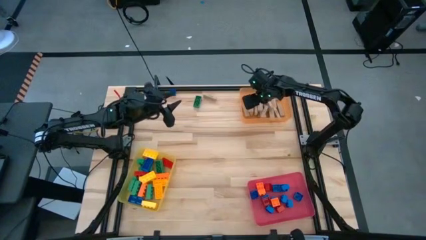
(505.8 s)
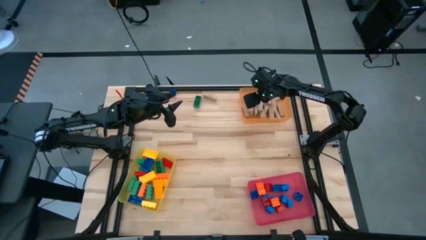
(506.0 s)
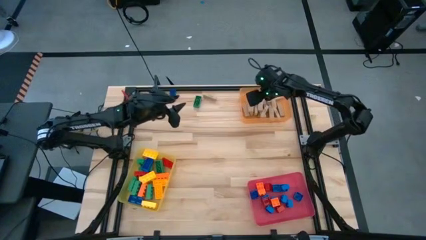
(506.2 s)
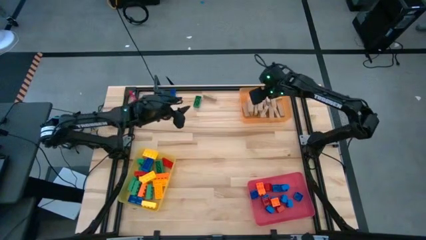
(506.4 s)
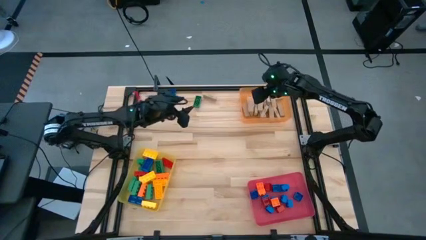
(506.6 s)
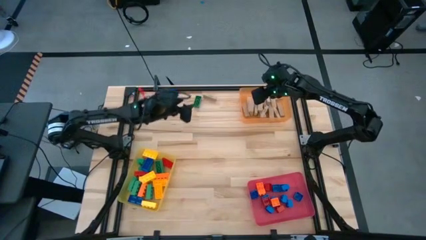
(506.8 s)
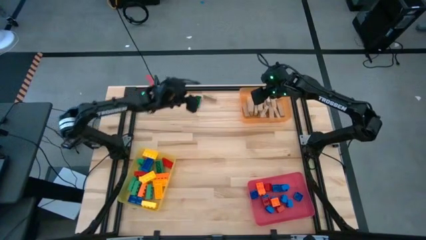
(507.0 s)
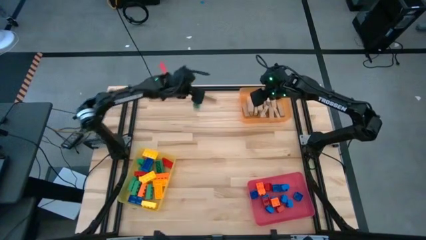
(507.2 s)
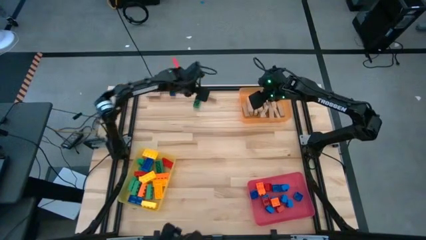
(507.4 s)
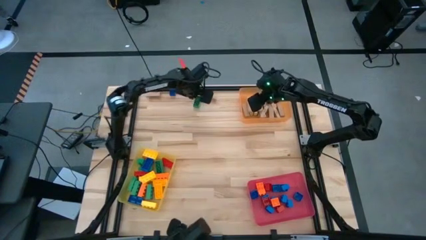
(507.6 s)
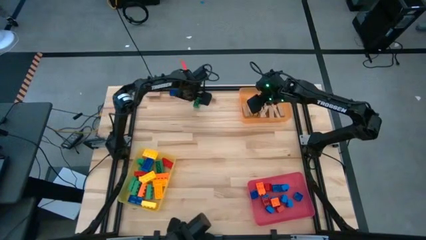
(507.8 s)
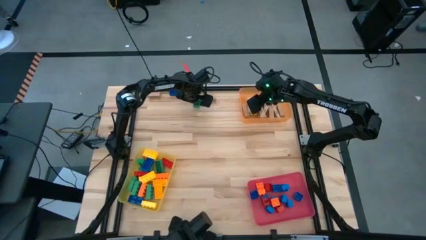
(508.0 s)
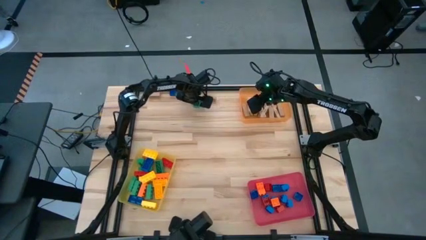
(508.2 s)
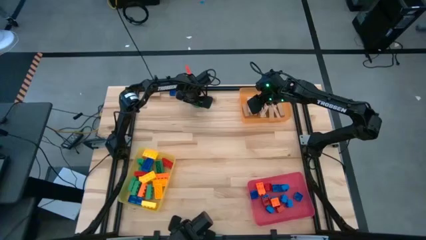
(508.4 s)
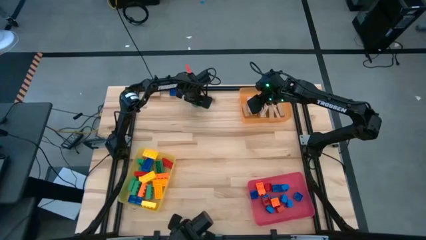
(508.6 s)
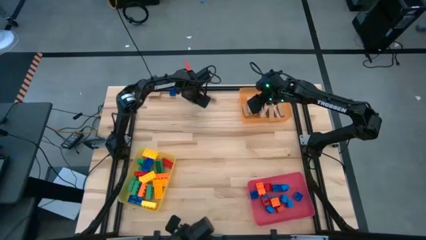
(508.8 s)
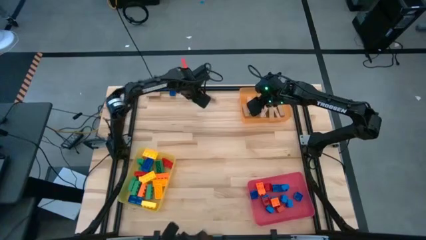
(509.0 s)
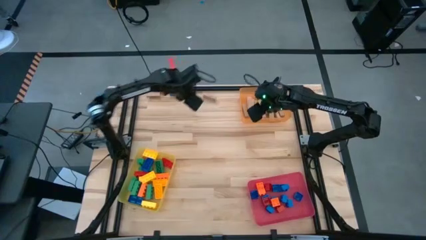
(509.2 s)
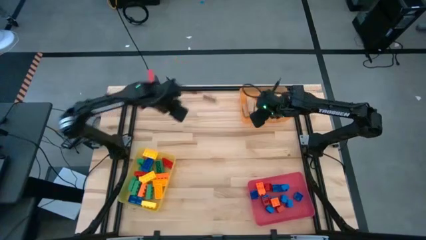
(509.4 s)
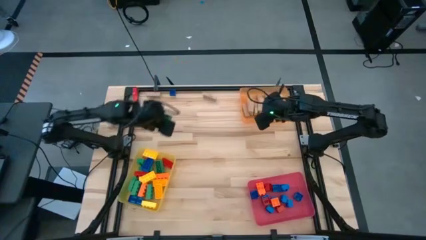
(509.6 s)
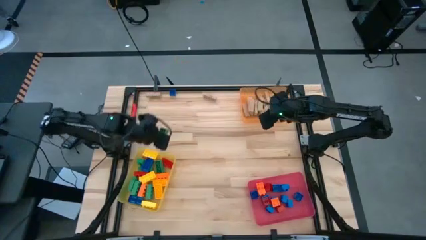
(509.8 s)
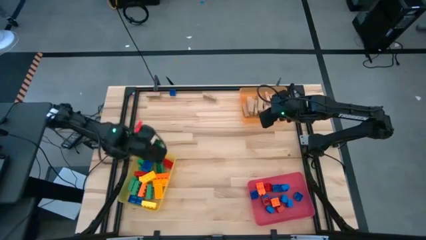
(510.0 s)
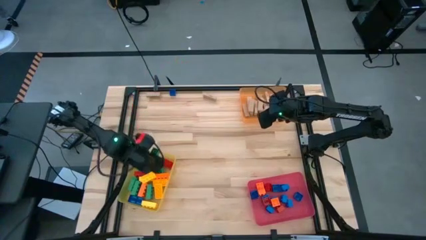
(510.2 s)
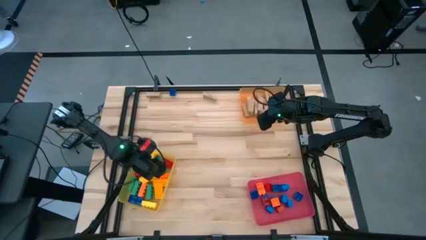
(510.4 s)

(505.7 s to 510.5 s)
Task: Sort blocks by size
Put the large green game piece into the yellow bin

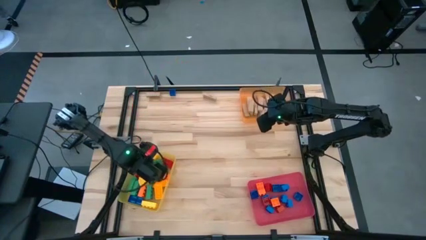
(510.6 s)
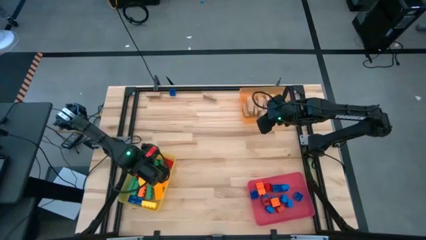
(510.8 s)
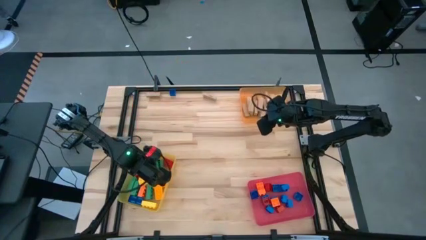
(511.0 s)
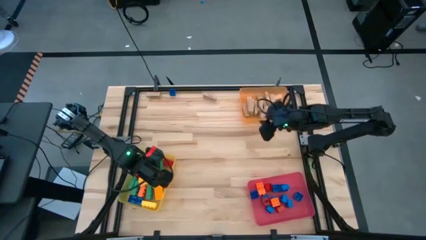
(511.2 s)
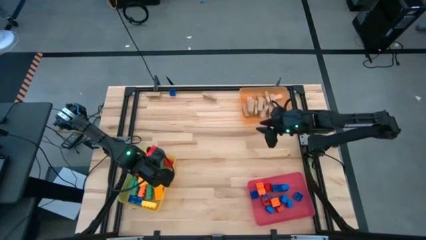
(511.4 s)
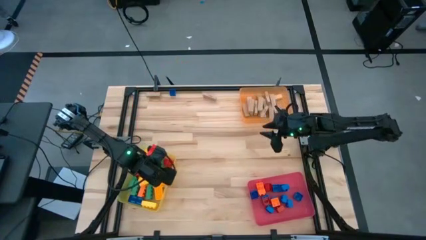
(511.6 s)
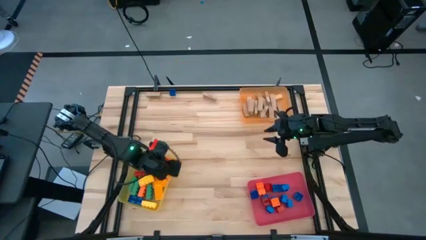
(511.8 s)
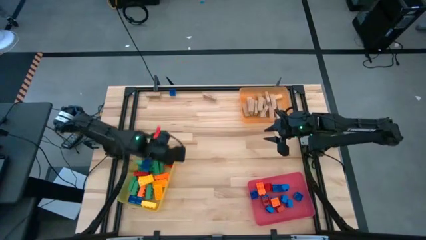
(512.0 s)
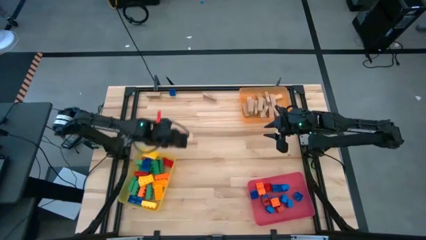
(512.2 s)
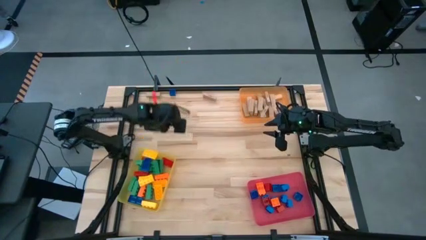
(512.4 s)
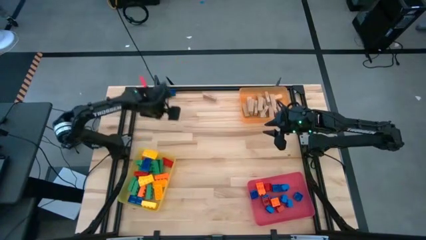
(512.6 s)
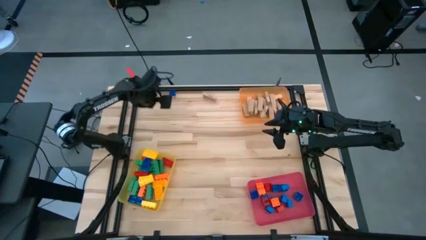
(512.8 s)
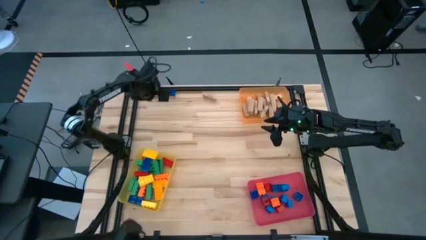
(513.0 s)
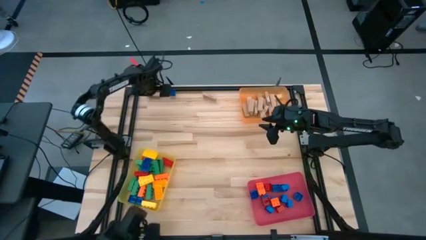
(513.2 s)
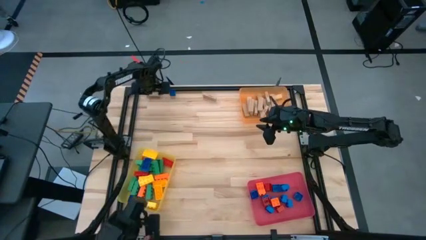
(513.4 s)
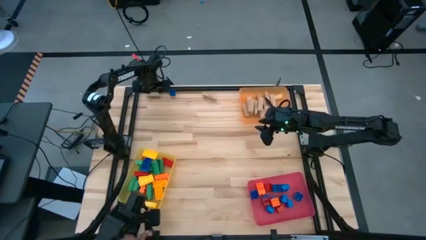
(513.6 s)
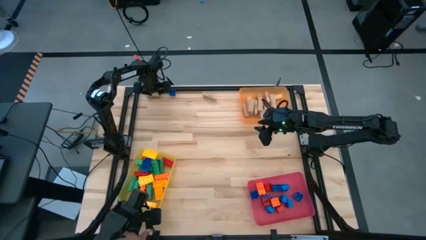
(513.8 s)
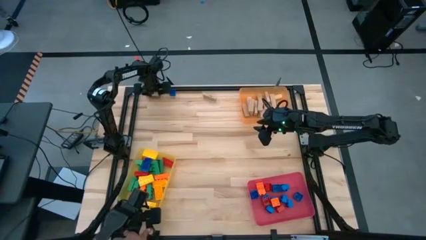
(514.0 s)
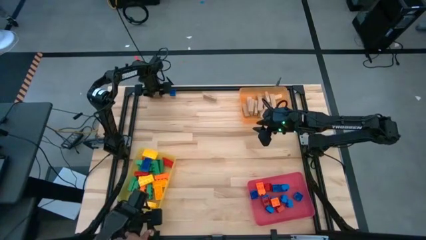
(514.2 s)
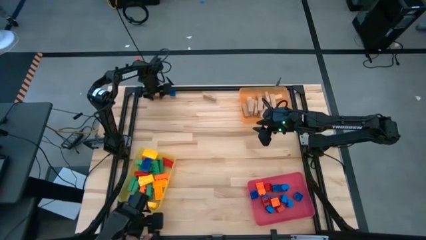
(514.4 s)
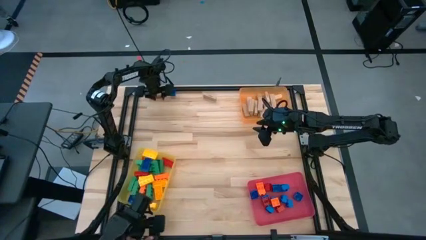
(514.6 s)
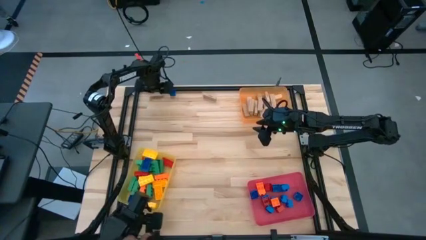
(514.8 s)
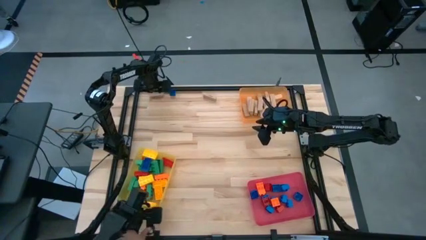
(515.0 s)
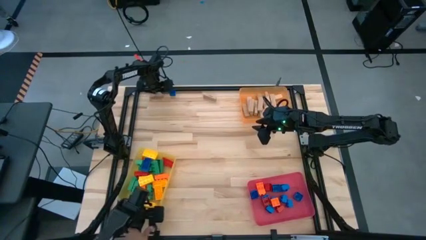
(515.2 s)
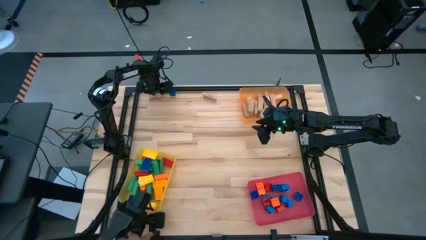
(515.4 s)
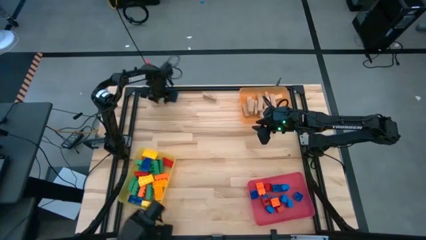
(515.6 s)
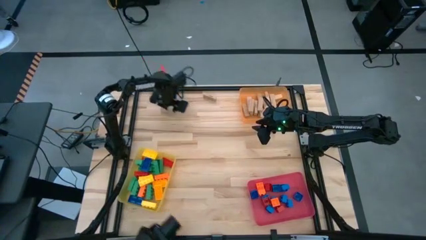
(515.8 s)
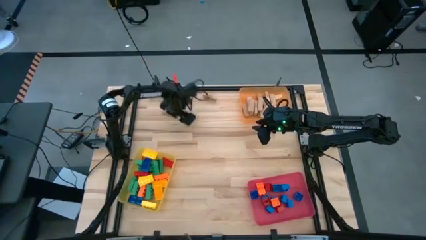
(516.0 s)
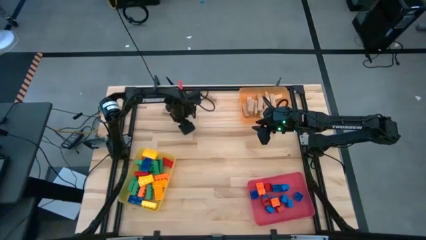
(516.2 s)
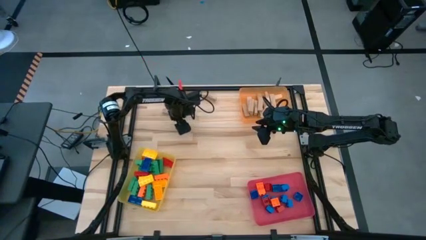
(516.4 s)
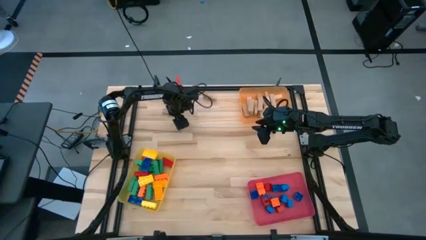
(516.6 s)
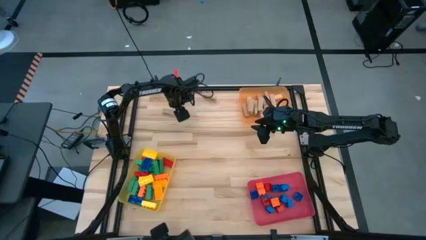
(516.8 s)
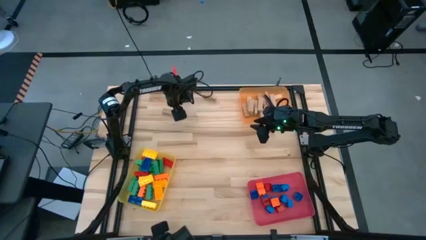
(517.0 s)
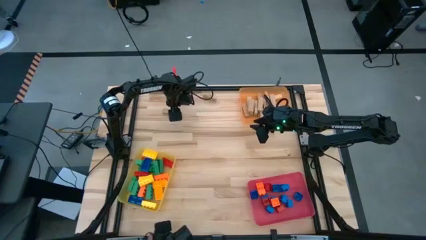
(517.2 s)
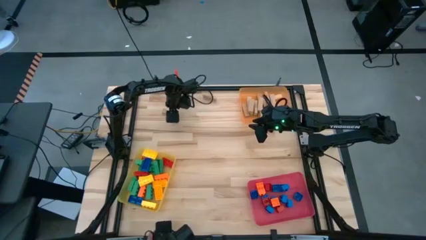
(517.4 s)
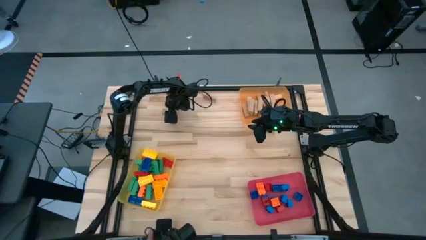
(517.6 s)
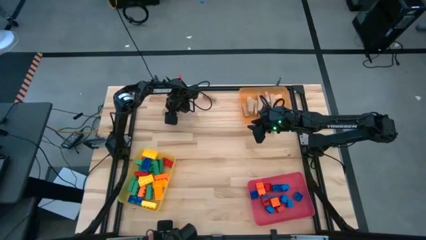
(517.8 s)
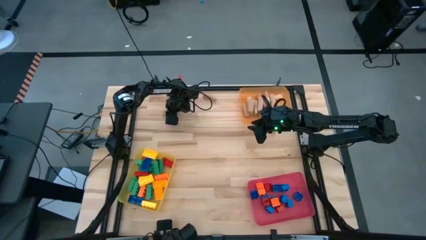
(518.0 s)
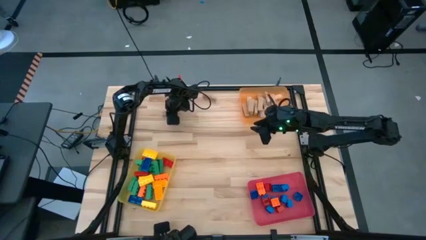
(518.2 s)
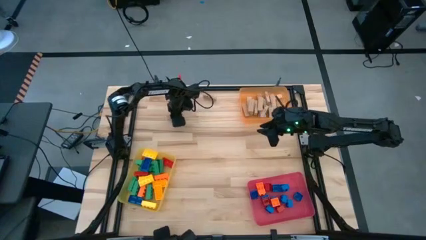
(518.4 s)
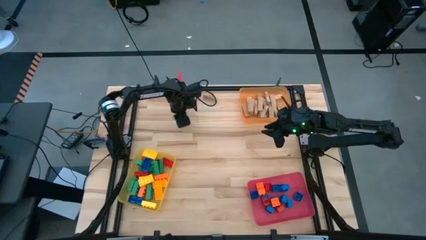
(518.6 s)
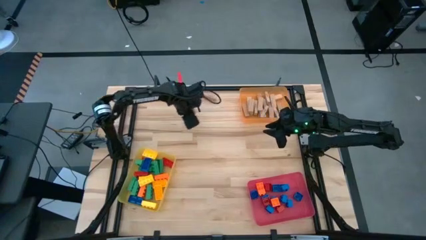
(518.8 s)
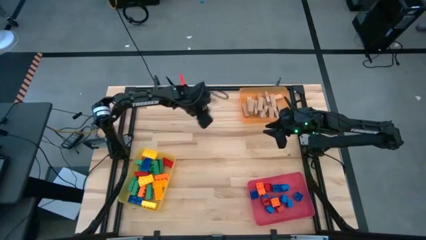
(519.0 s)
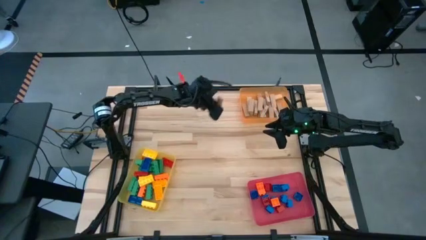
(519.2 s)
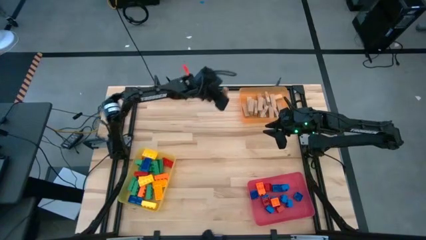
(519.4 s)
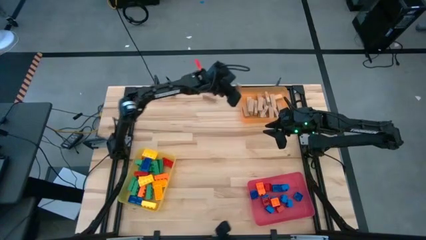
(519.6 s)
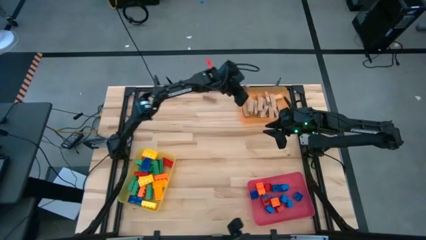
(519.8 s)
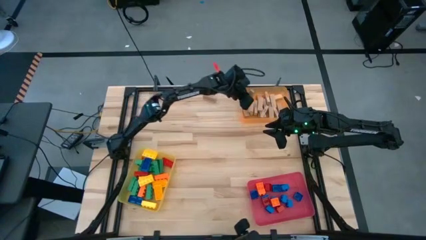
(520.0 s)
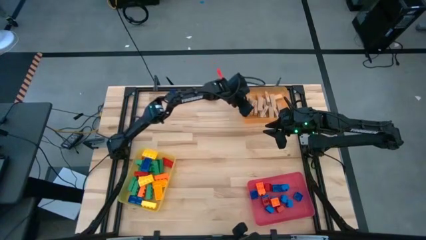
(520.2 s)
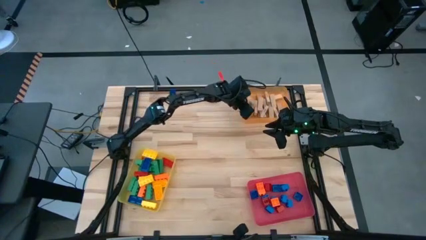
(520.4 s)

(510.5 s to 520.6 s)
Put the brown block into the orange bin

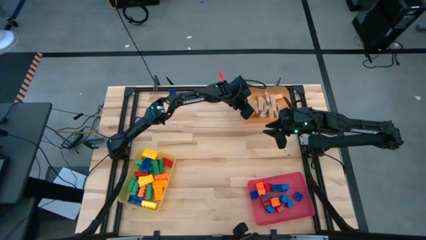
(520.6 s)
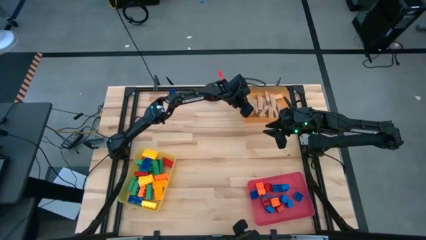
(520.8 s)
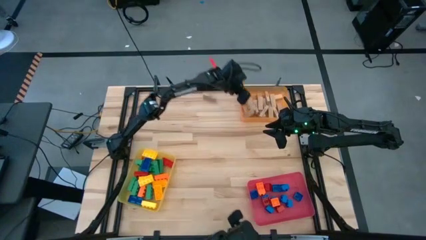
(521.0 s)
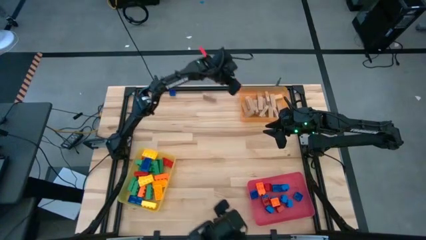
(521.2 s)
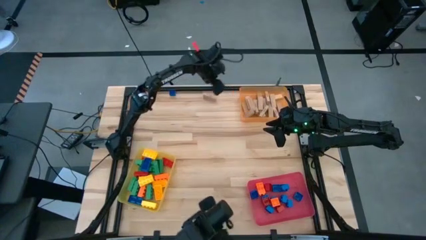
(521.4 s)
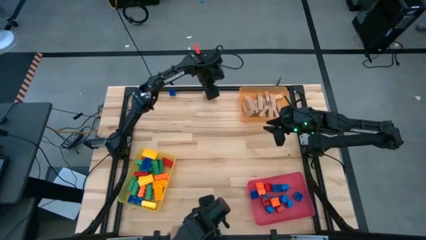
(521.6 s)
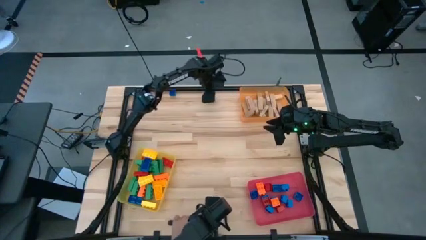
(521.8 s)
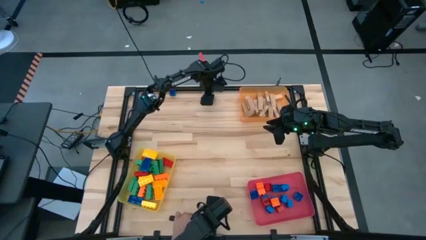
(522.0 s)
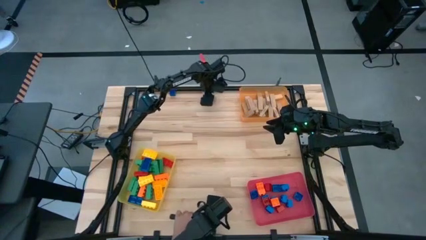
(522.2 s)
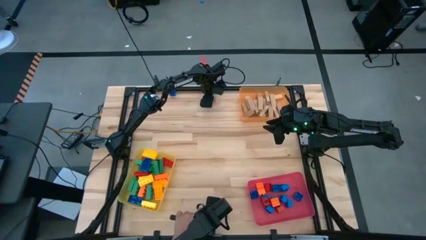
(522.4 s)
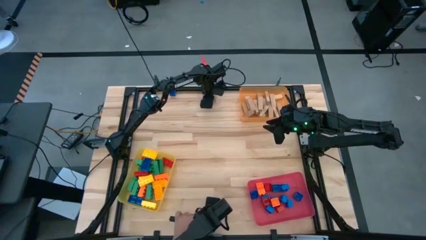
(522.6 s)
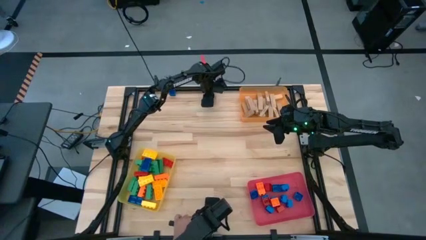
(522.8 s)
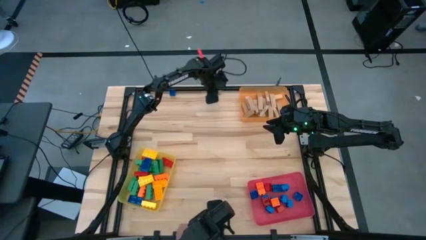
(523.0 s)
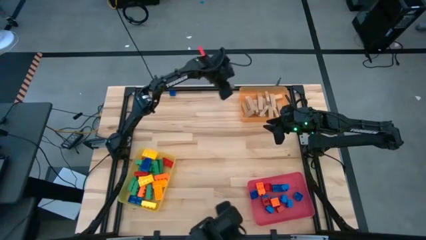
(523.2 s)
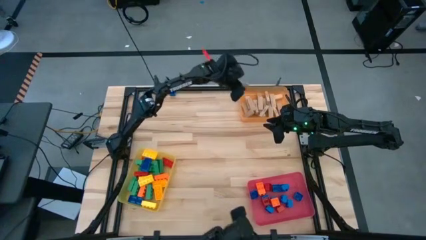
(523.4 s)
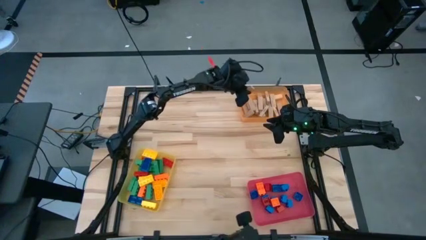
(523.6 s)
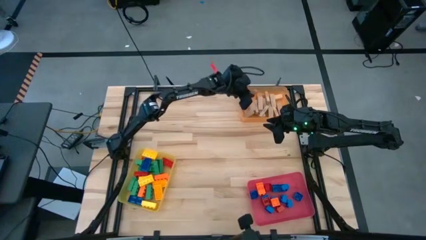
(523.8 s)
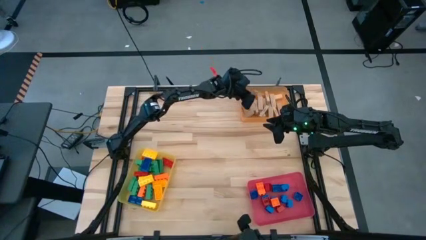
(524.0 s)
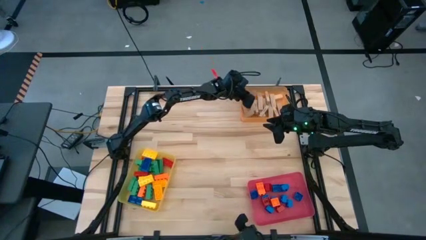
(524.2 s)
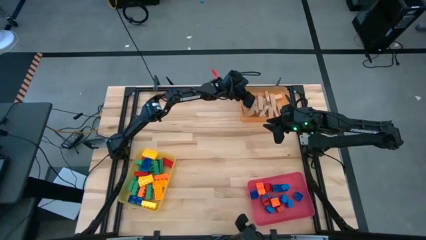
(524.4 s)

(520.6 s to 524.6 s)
Put the brown block into the orange bin
